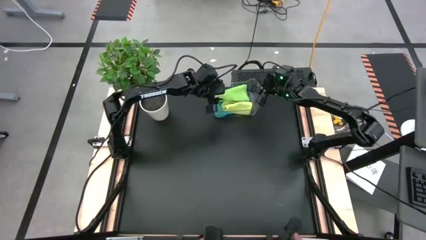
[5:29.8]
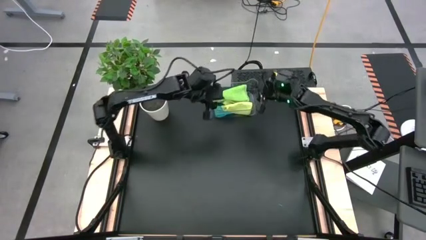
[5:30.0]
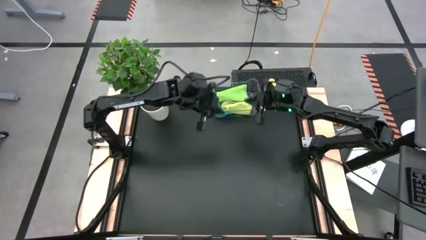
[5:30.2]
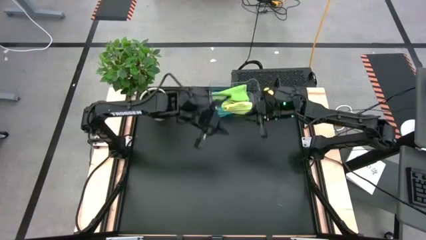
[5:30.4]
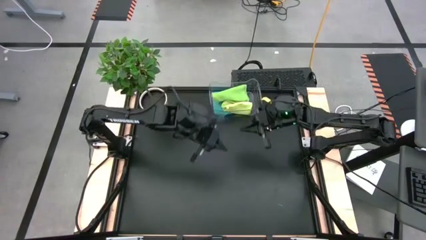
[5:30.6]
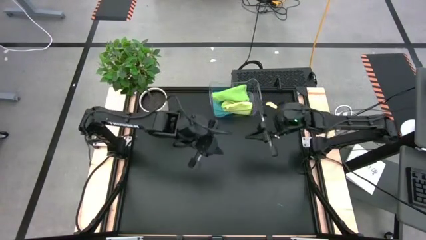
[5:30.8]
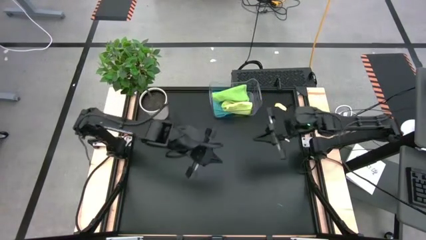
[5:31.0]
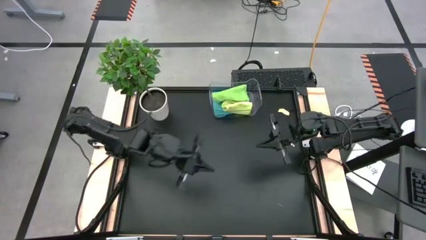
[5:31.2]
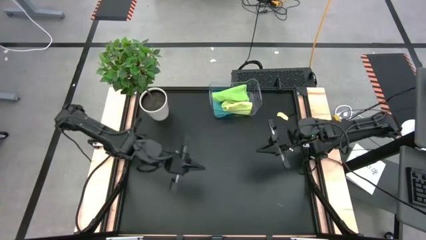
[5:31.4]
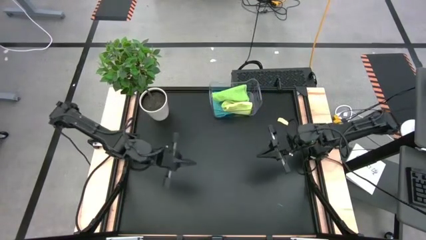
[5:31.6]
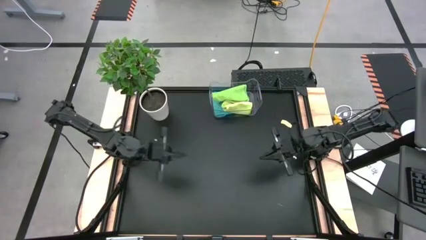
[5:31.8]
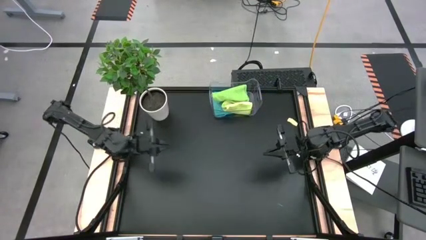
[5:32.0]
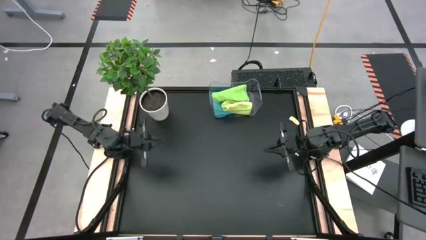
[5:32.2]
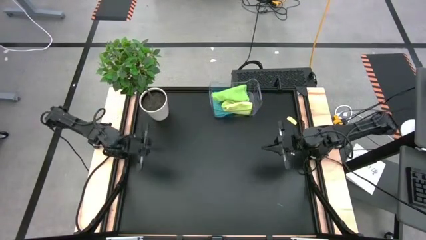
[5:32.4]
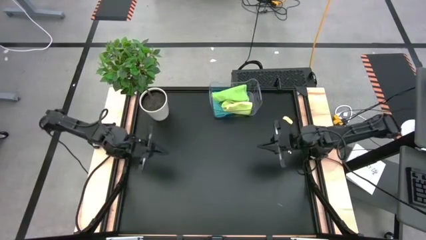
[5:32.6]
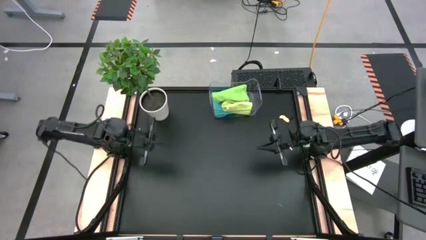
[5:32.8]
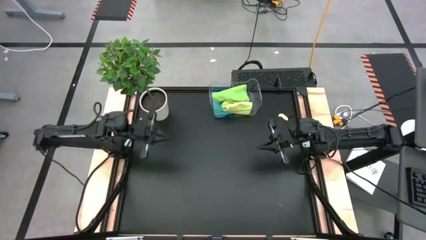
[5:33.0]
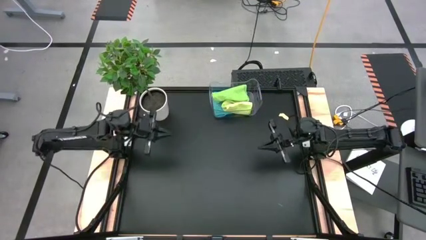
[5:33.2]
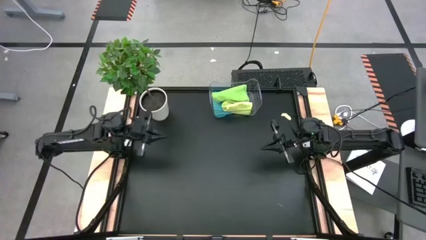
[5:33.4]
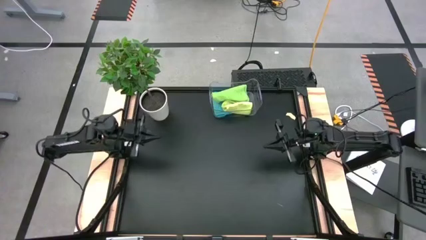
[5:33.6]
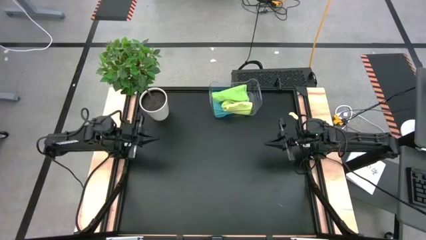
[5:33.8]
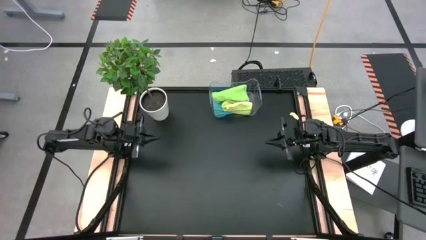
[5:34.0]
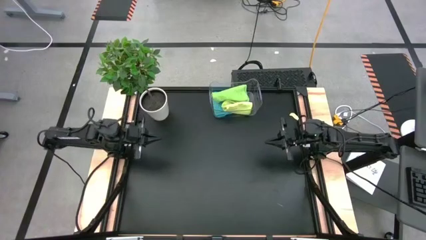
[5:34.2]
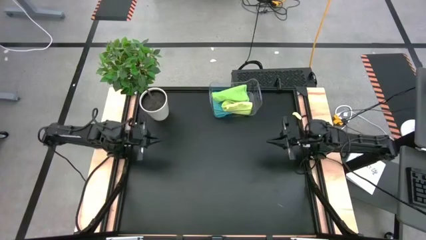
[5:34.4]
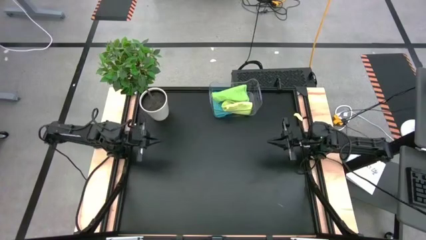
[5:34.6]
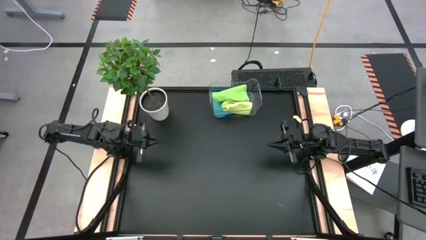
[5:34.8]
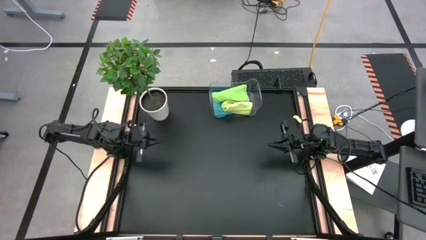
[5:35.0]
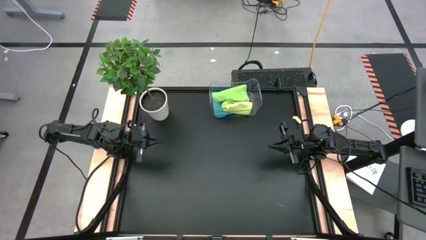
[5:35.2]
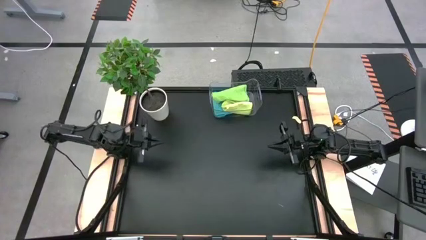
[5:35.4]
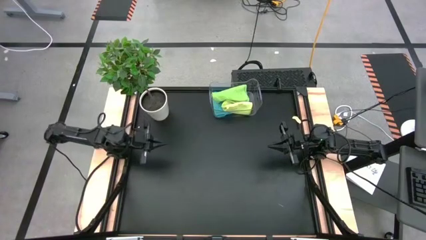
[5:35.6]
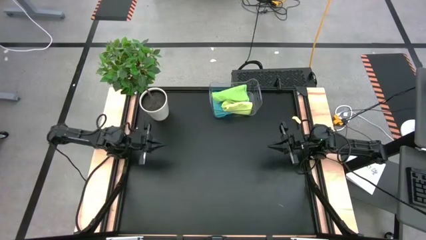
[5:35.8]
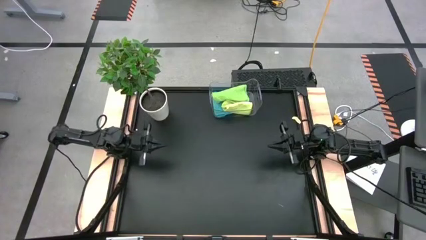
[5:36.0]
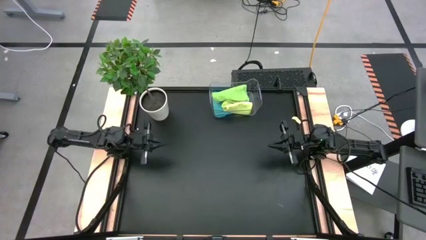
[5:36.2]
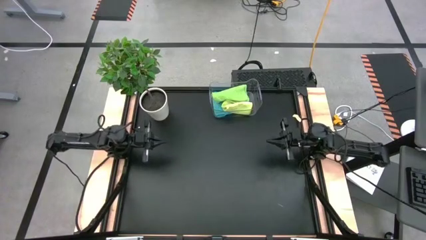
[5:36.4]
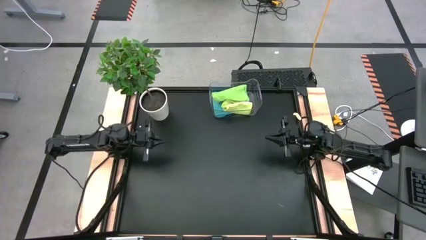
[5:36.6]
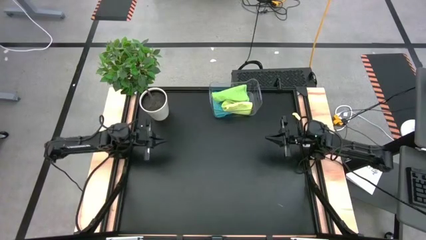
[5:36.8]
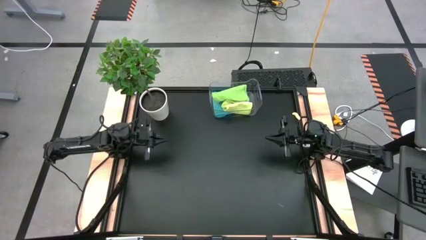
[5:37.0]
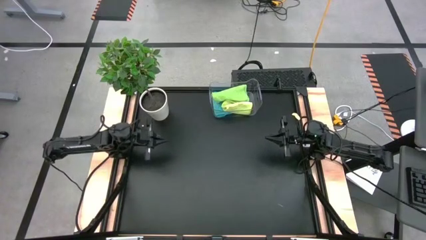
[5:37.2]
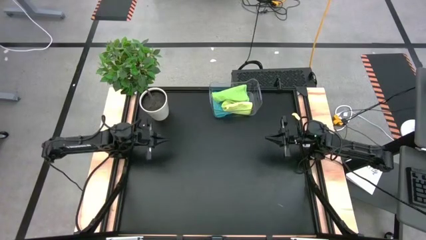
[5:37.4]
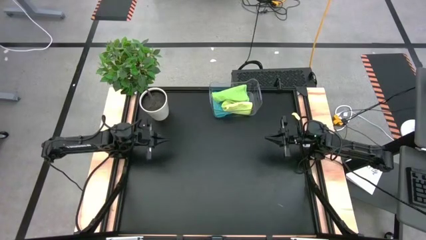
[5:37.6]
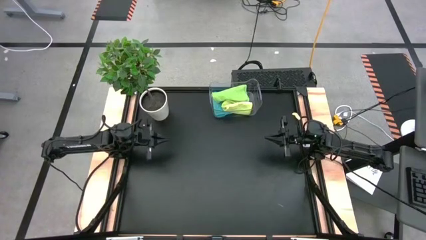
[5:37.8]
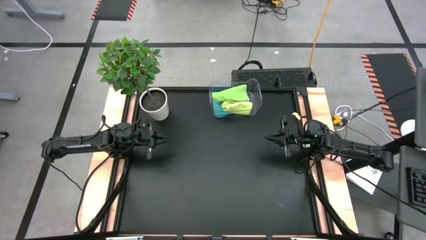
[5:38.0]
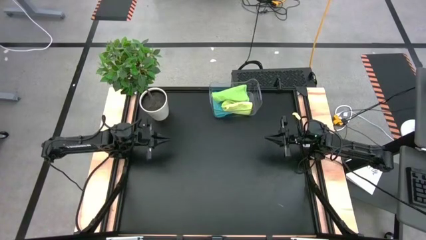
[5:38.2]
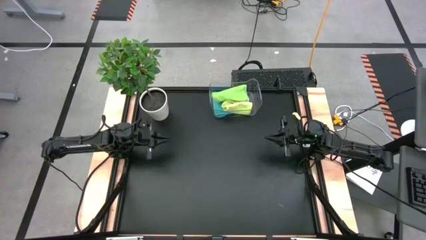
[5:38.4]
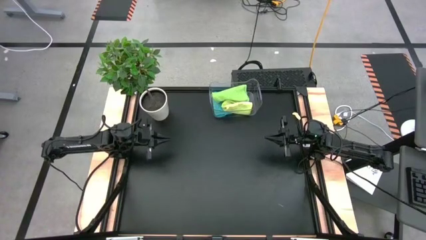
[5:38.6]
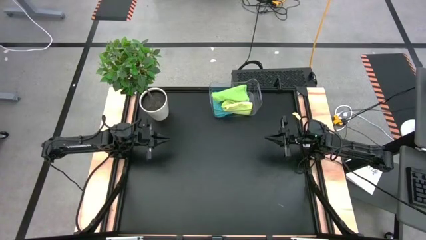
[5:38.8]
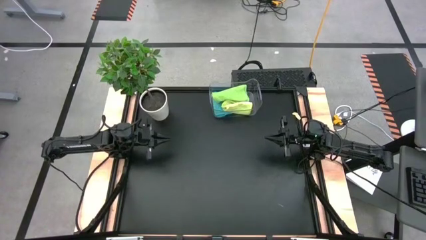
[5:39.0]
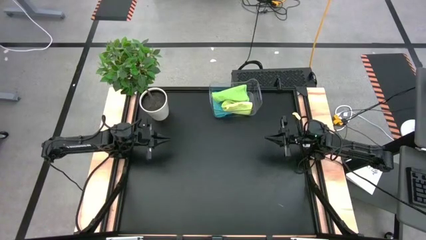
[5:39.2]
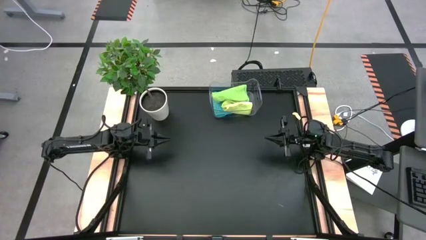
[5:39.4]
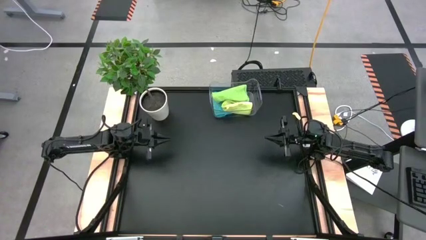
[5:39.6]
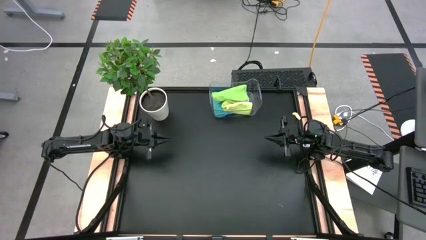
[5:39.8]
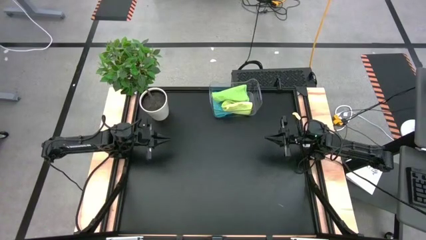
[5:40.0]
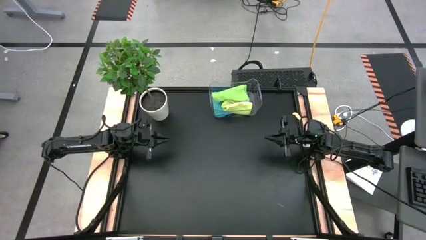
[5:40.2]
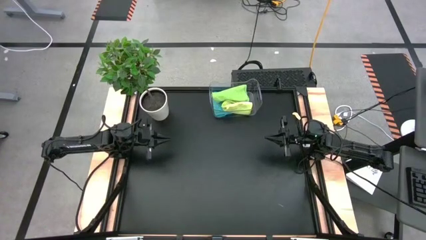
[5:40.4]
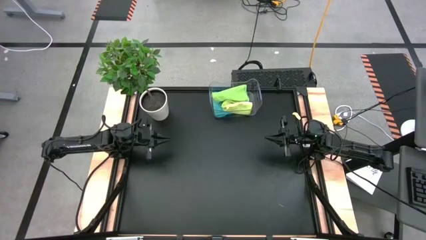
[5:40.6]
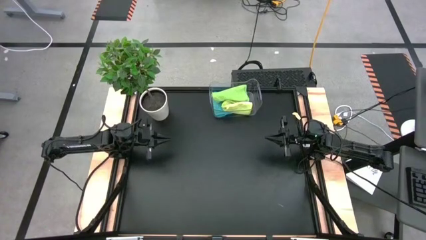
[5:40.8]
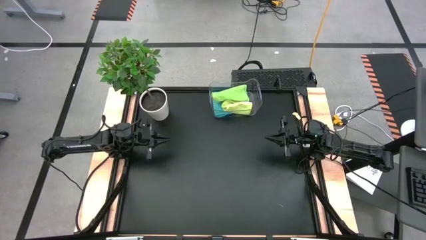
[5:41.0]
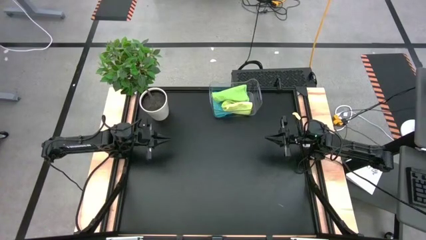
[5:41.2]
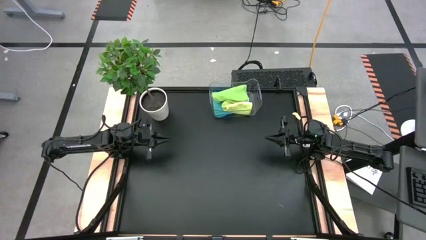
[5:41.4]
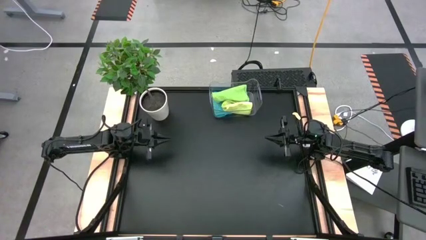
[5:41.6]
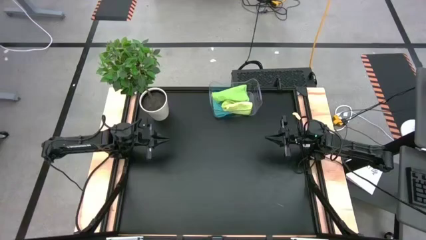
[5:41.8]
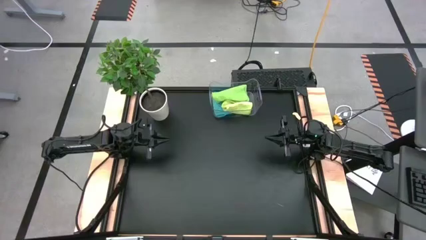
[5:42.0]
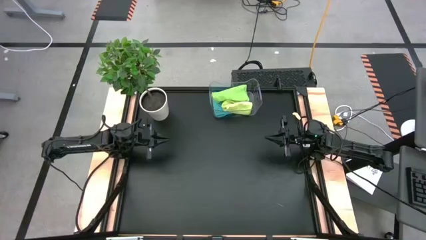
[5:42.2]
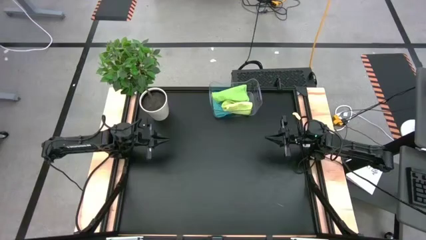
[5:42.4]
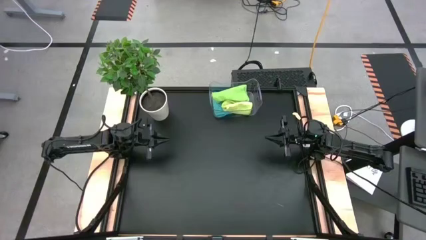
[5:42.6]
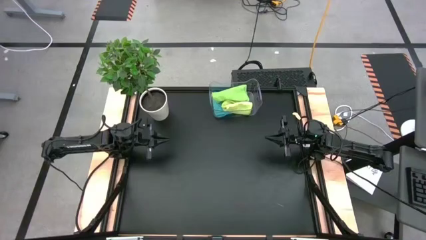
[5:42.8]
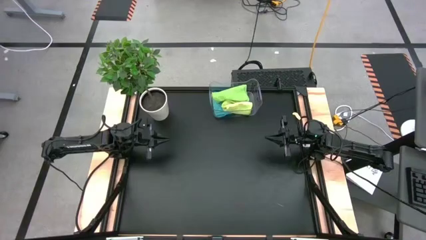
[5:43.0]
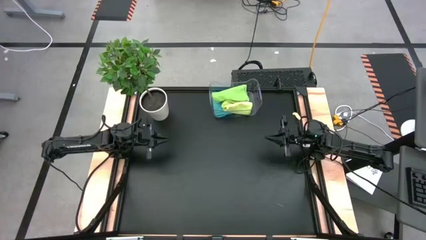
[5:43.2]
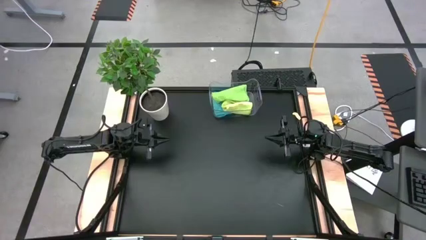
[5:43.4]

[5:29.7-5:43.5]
Task: Fold microfiber towels
Return to Home Position

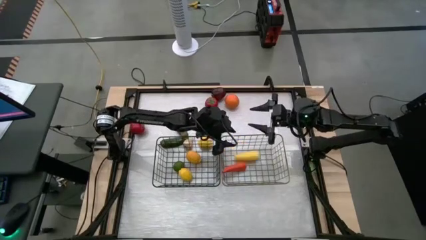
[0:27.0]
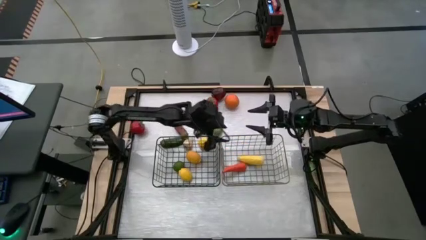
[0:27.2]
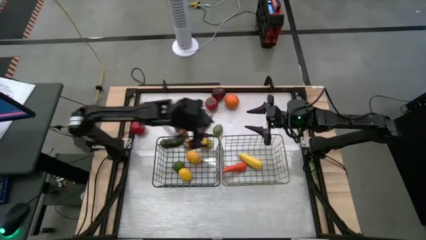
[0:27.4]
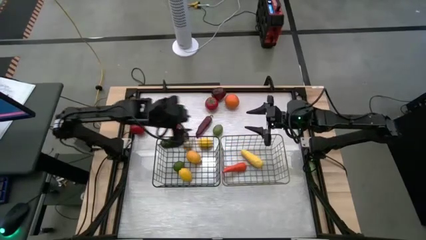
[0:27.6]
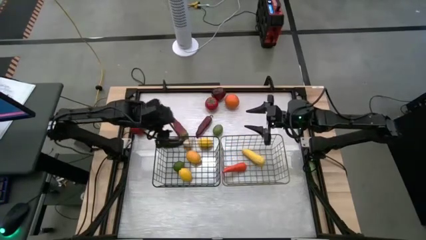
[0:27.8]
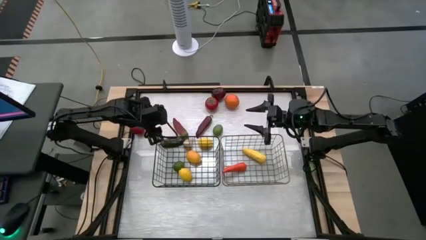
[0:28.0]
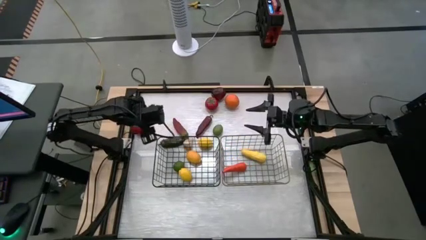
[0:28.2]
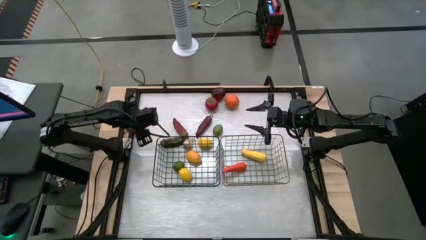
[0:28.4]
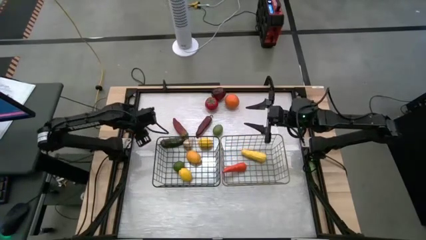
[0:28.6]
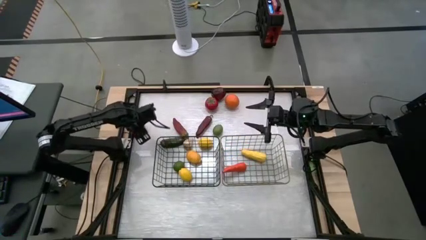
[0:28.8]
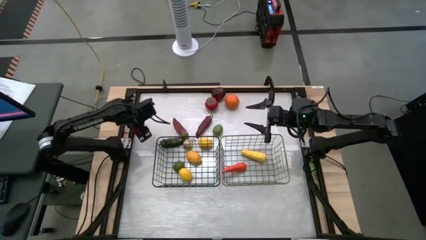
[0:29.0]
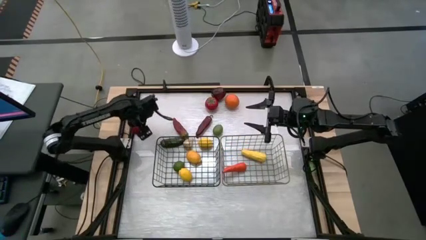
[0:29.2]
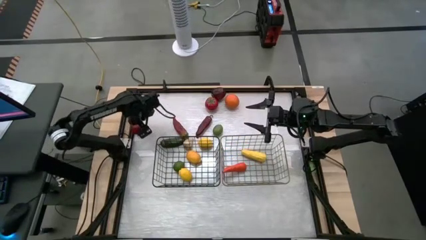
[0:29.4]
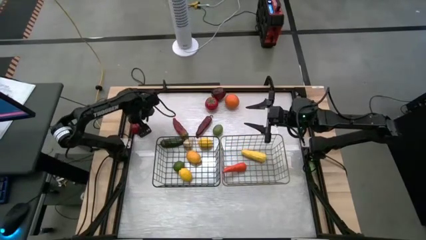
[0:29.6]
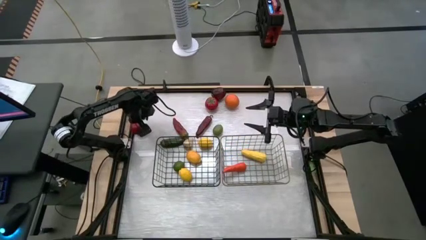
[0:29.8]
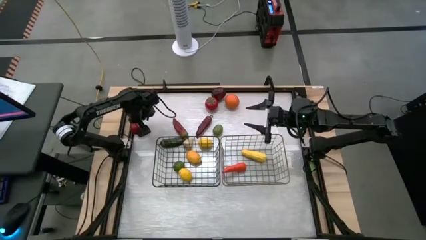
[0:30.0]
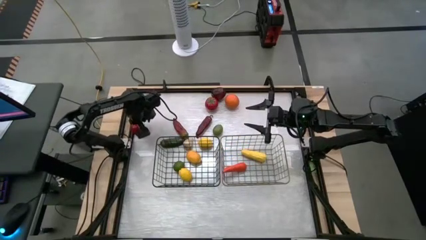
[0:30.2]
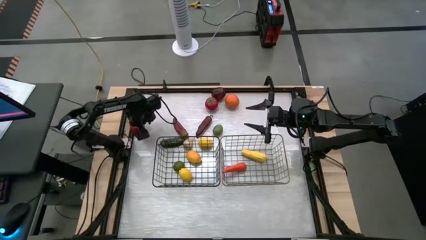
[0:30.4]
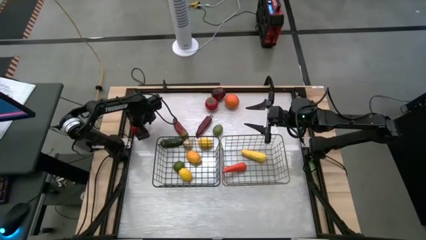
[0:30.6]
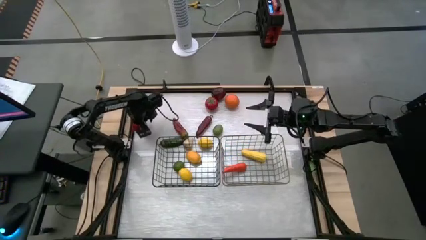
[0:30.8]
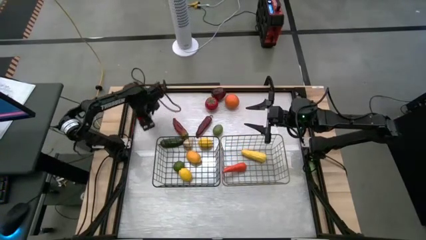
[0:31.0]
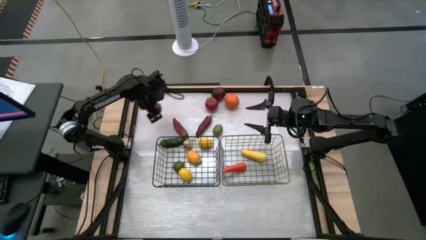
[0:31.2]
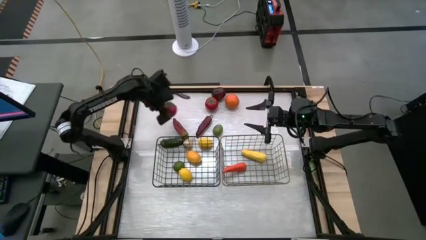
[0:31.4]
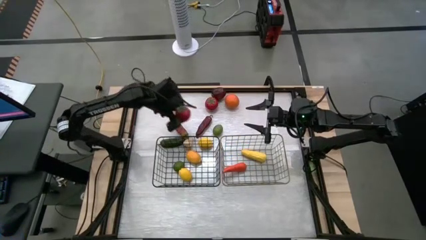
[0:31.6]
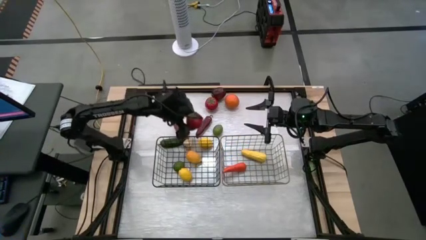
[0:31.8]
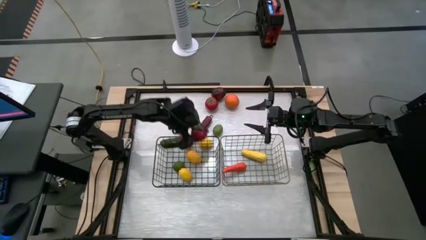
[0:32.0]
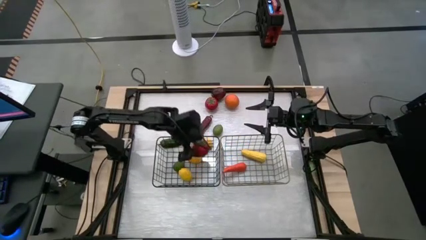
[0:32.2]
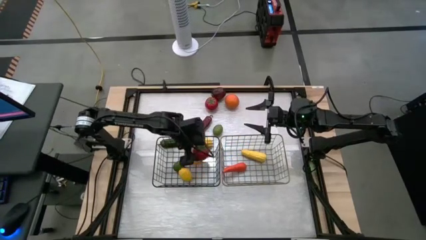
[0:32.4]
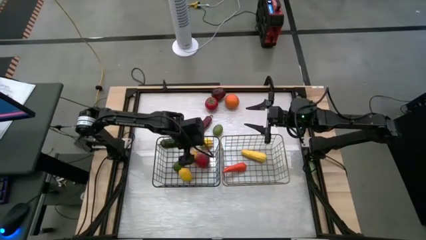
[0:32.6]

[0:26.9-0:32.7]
Task: Sort produce into baskets
Put the left red tomato into the black wire basket
